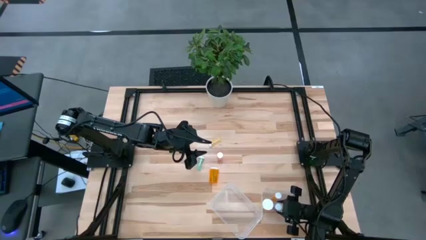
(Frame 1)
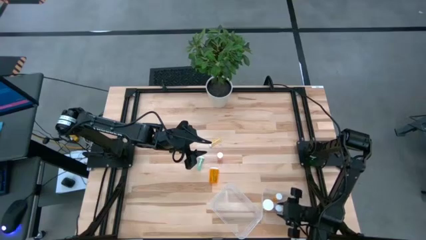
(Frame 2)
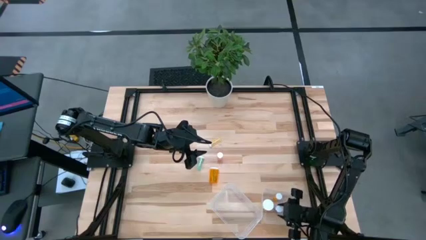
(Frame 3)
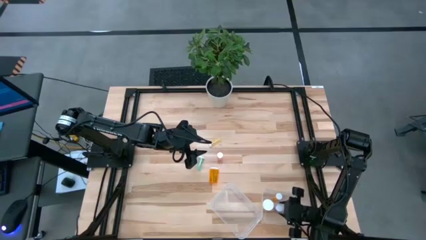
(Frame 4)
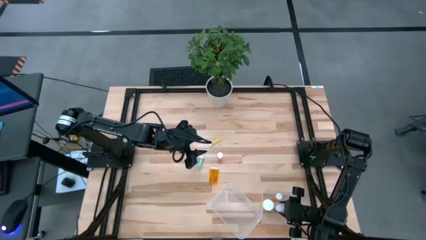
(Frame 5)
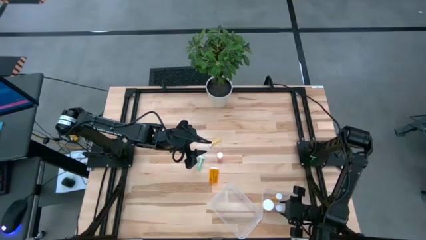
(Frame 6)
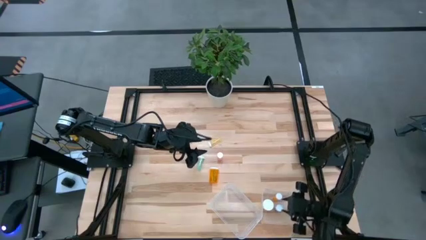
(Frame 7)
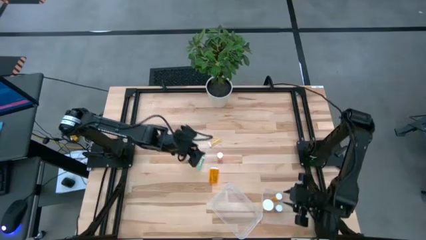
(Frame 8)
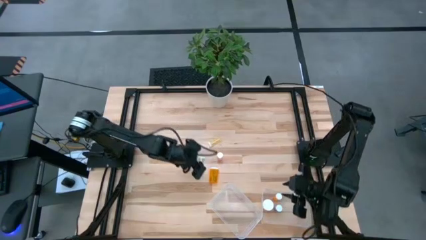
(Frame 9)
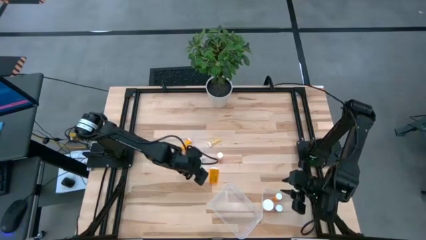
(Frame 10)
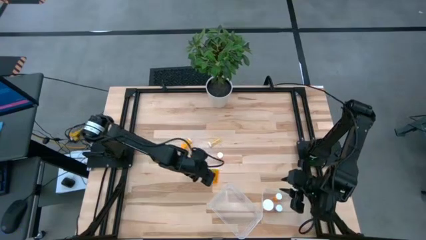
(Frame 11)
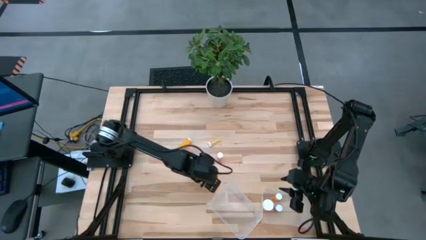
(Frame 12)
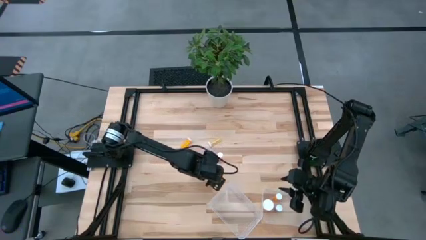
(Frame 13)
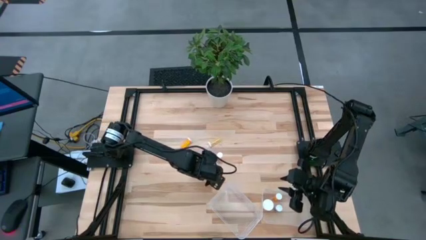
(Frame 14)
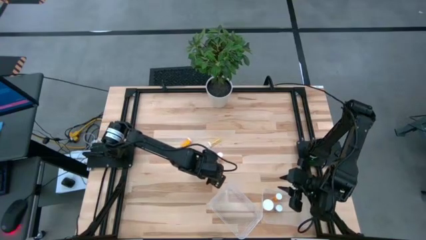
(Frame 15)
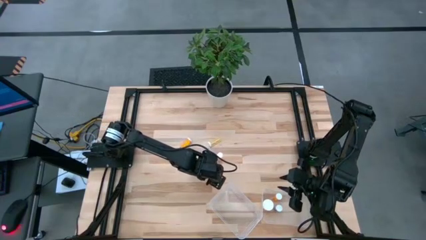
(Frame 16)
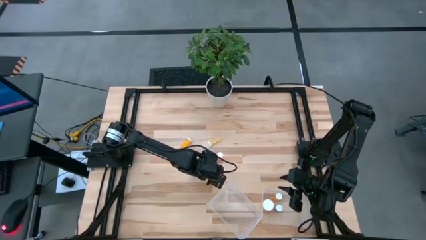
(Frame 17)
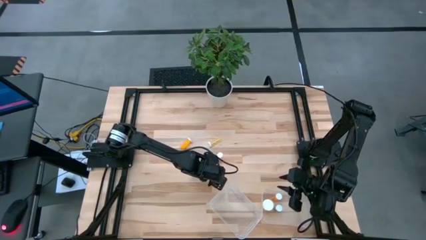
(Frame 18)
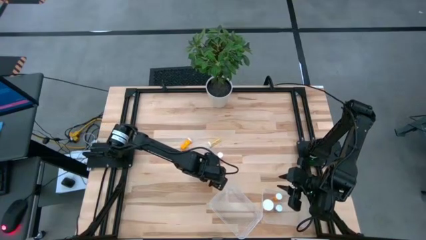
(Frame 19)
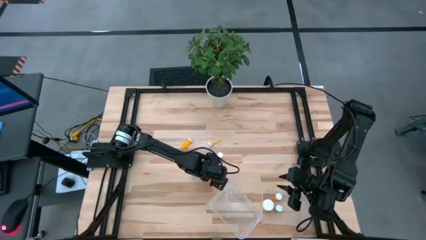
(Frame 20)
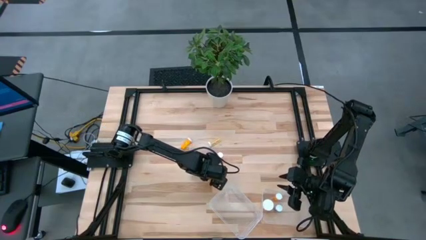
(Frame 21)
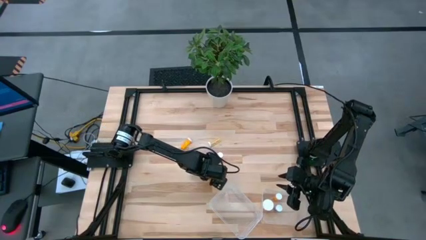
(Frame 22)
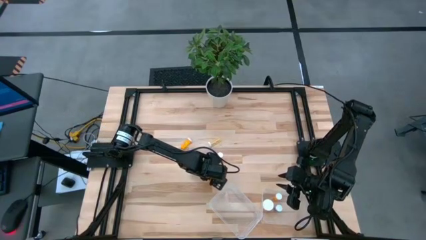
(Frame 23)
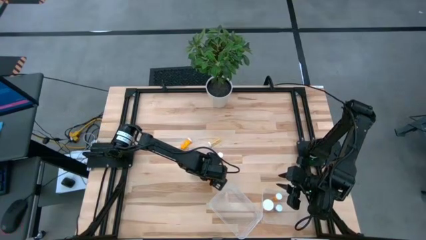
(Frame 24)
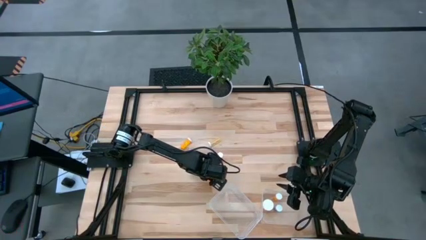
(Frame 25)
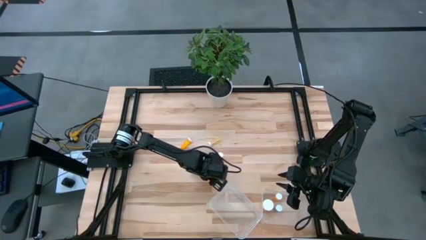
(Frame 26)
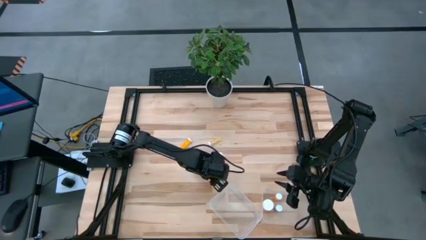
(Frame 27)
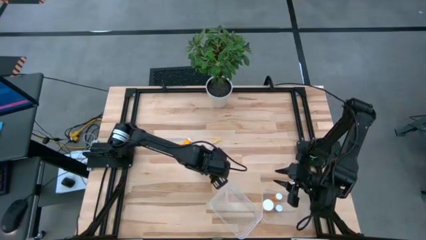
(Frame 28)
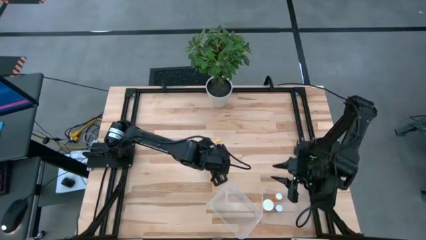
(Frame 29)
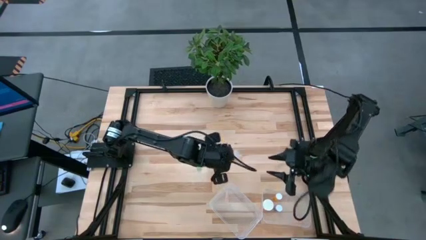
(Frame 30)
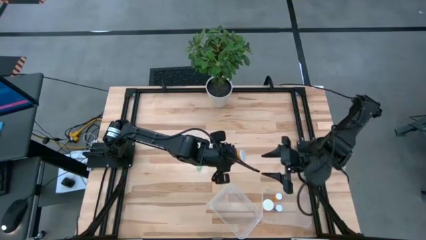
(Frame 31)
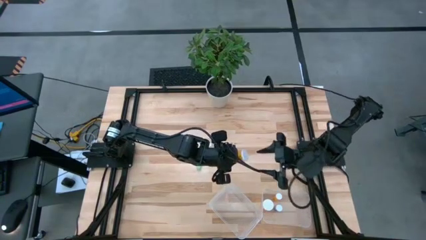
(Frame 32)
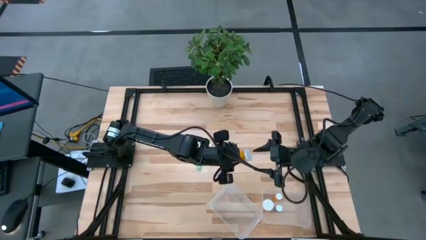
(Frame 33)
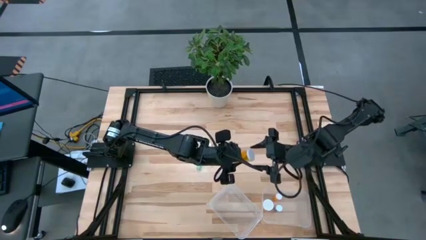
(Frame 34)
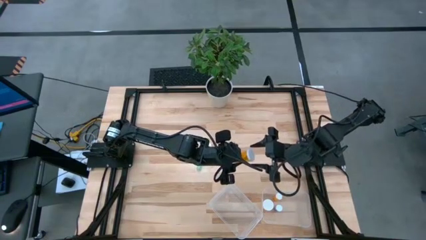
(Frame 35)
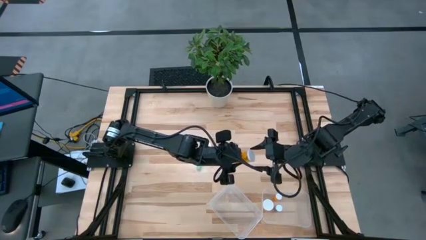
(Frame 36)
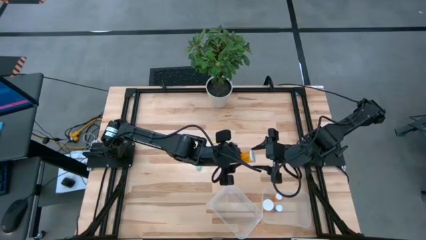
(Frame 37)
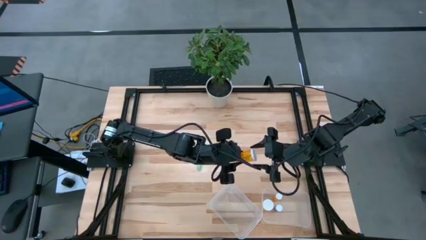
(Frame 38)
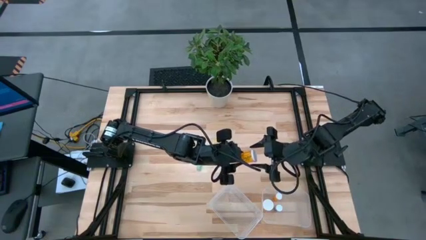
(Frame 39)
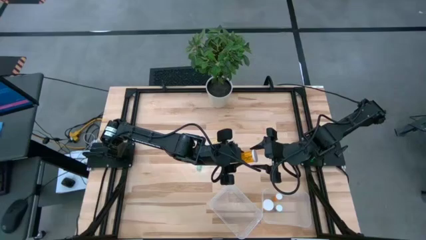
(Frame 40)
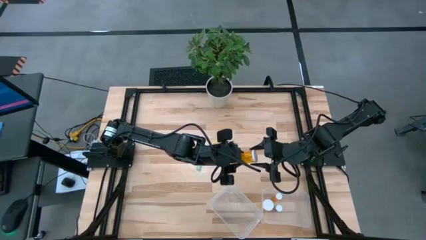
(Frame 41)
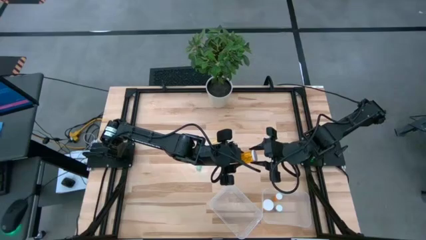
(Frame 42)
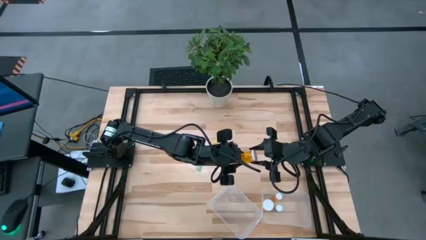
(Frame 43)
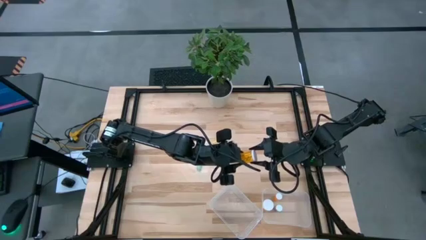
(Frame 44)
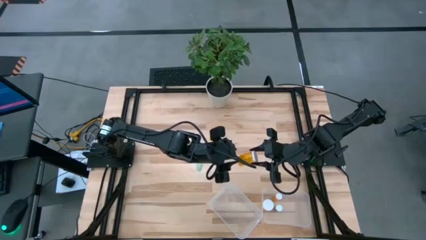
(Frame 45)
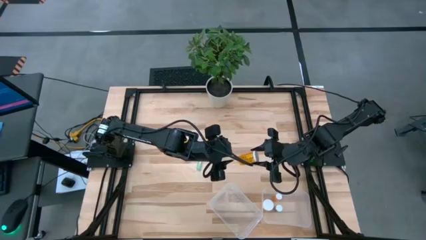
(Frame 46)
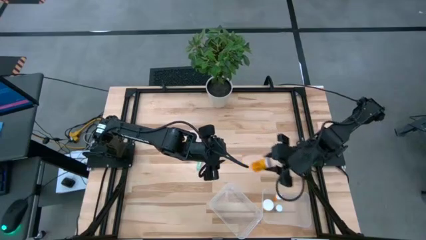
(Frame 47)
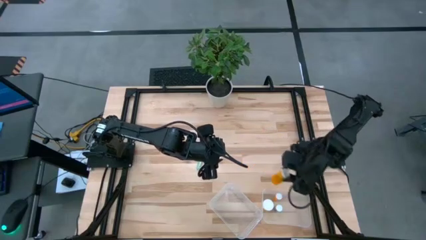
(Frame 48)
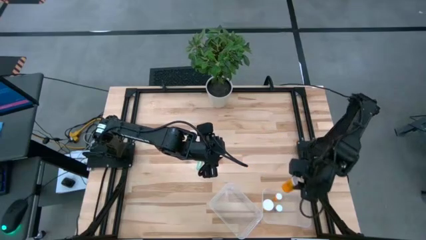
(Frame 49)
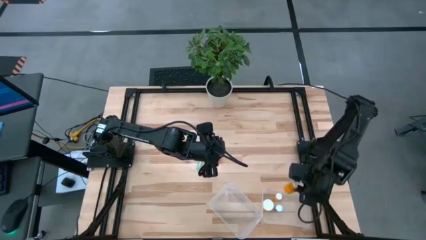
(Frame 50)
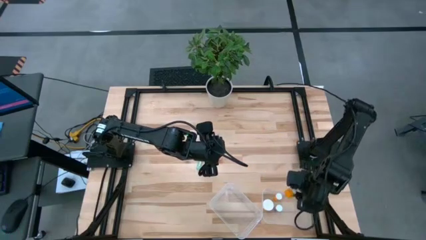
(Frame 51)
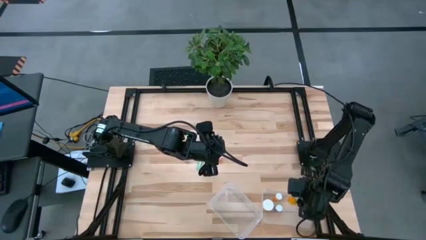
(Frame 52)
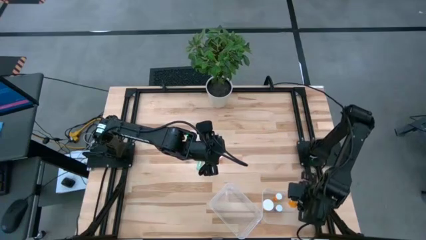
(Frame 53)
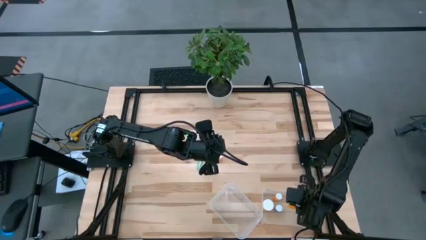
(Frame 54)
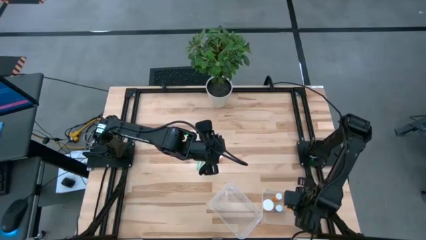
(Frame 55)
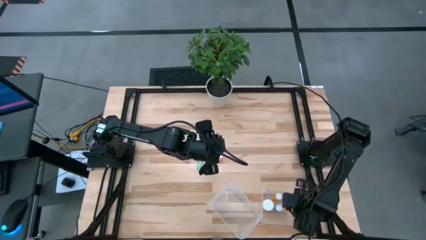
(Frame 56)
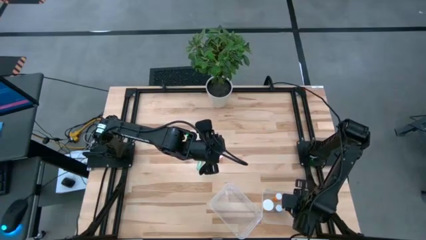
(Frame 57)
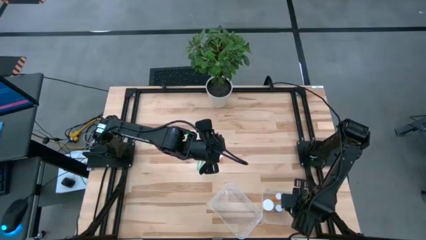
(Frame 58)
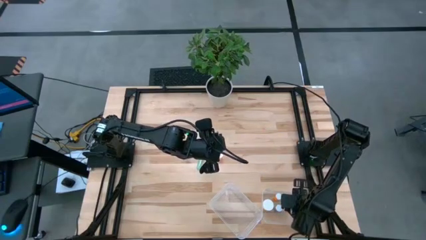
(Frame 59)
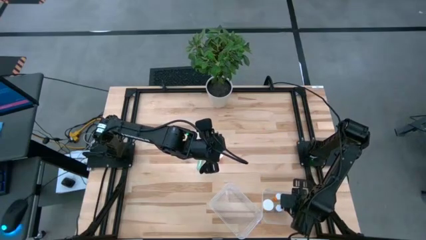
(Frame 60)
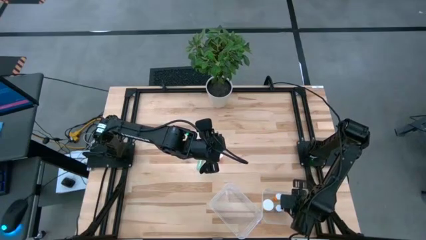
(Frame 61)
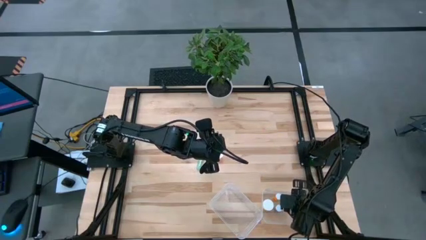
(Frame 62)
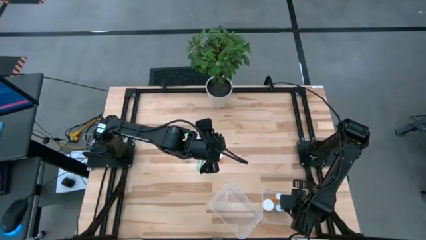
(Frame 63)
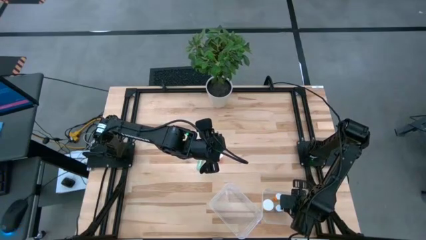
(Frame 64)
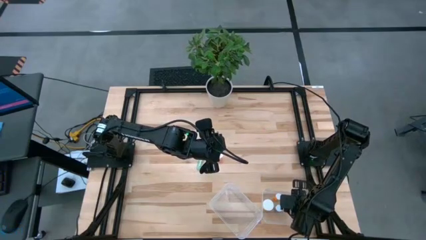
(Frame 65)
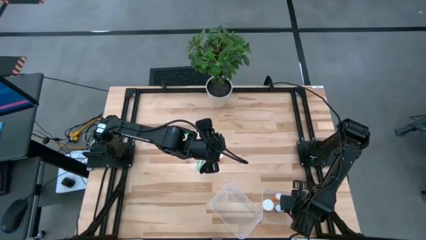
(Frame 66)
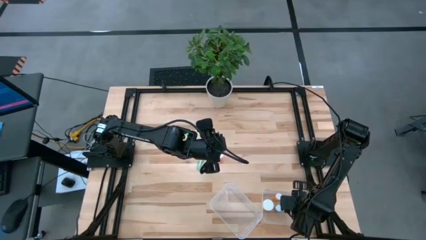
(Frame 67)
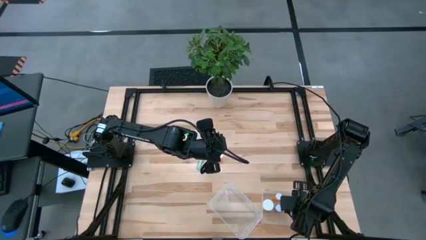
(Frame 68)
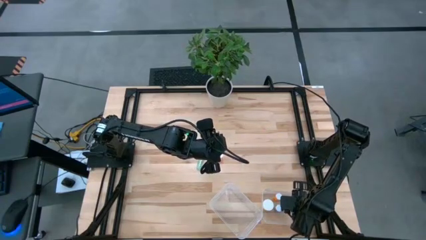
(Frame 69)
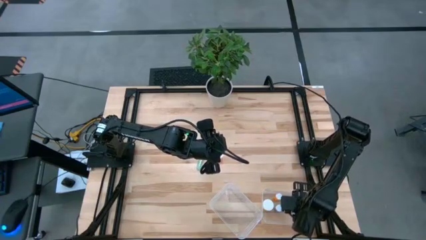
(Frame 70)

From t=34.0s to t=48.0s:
Task: Pick and place medicine bottles into bin by pill shape (circle, oval)
Put the big orange pill bottle into the right transparent bin

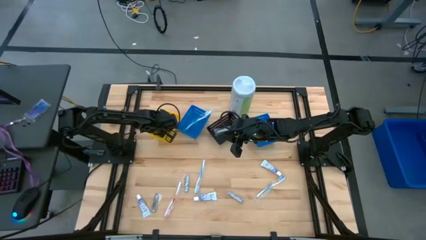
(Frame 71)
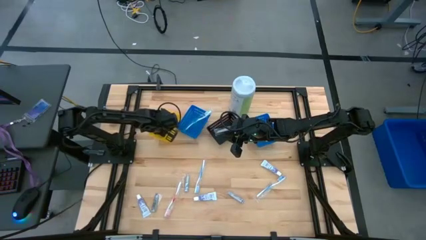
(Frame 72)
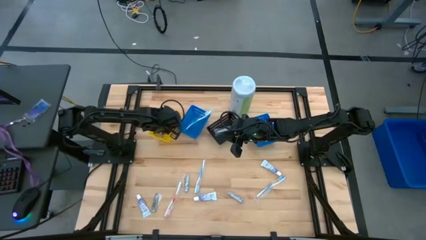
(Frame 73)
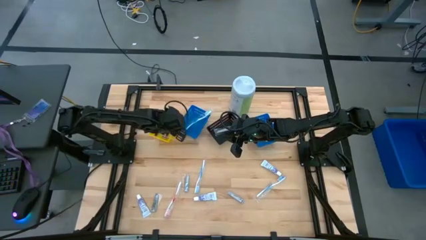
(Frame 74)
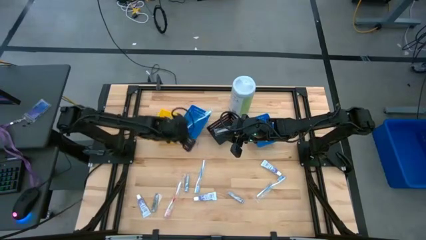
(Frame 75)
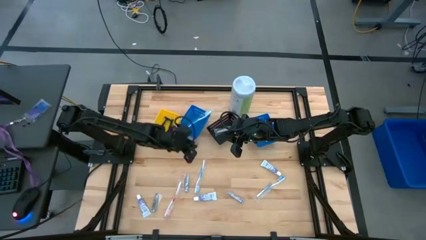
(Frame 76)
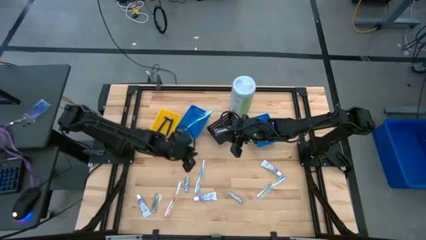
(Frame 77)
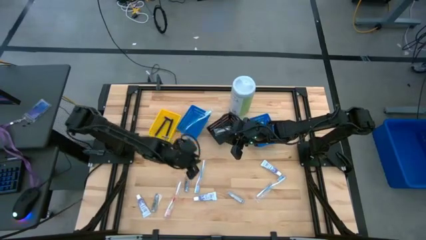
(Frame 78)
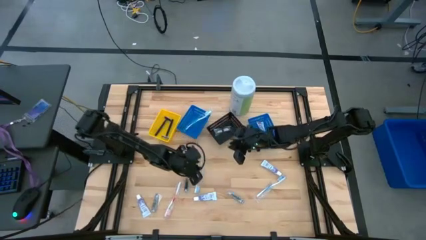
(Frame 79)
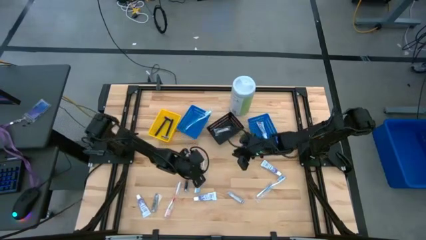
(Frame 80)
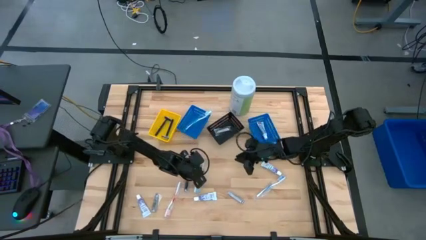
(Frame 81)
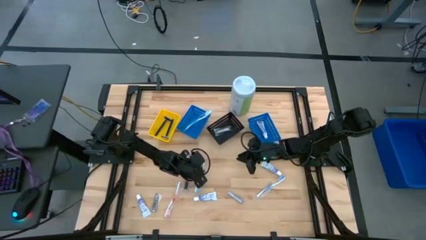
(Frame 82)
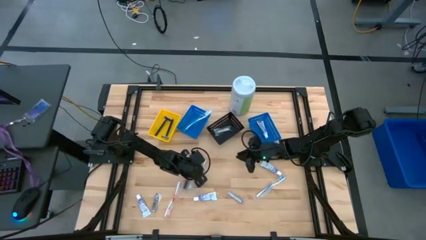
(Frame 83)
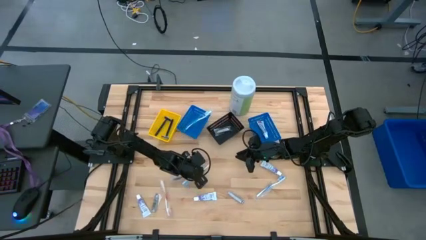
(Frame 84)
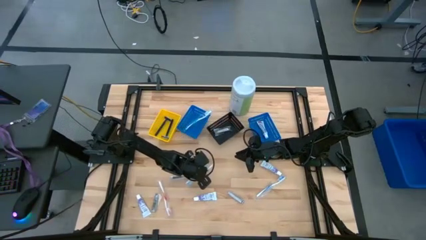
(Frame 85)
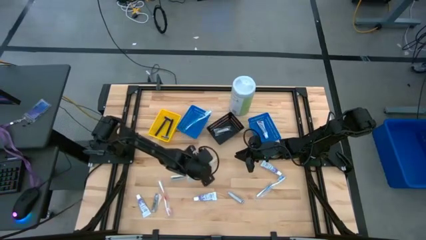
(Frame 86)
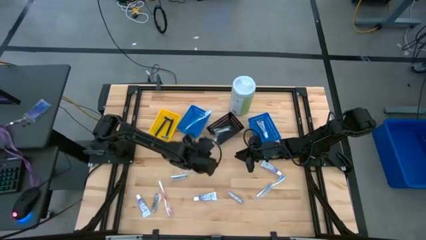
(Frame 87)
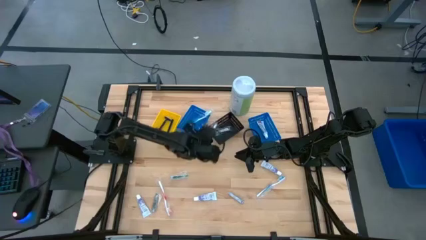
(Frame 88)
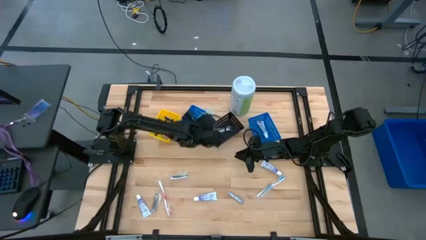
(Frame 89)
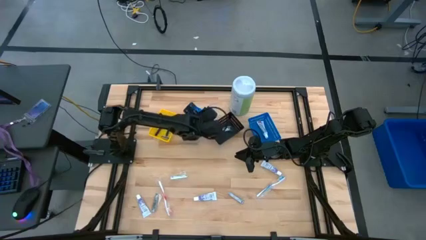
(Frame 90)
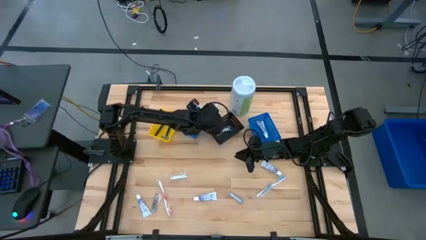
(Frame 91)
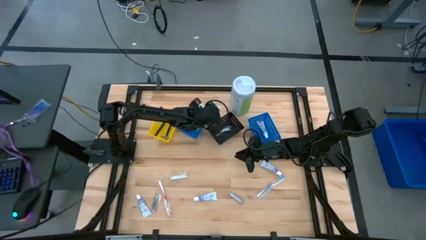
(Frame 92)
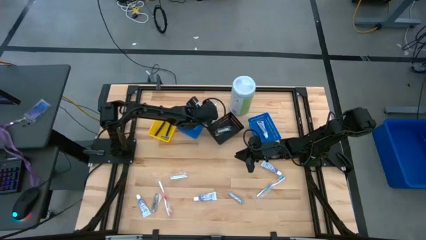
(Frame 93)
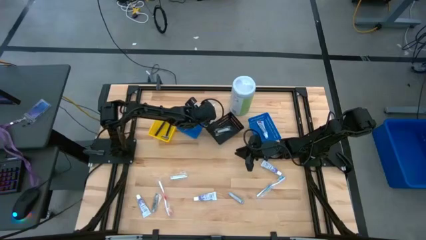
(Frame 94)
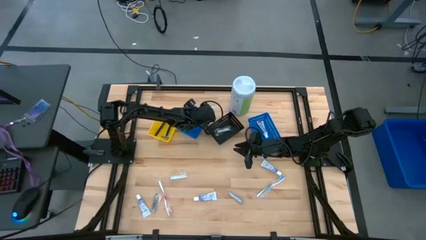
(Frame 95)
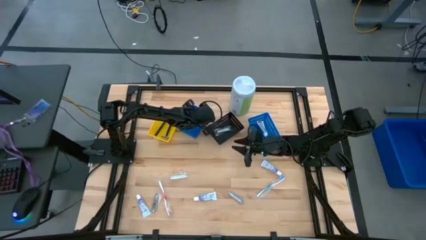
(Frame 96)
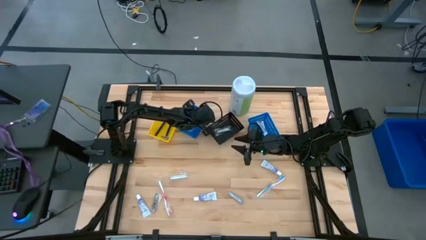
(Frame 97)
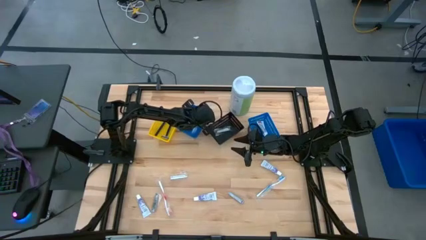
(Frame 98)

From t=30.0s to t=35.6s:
Task: Pick & Place Travel size toiletries
Put the blue toothbrush into the left blue basket
